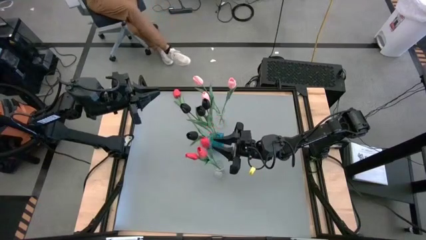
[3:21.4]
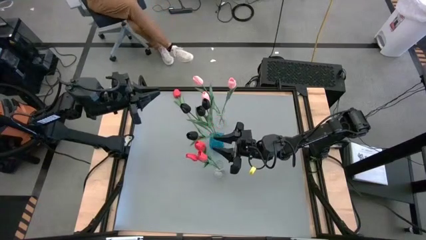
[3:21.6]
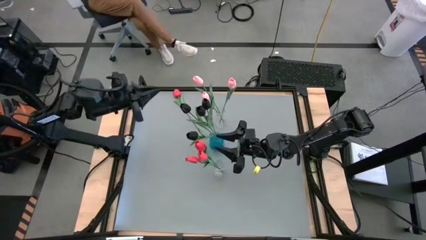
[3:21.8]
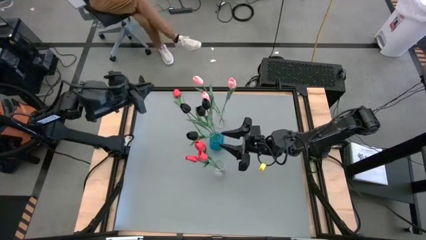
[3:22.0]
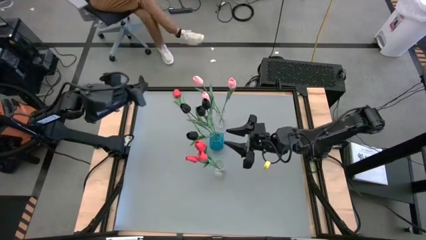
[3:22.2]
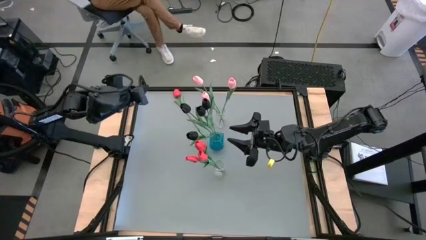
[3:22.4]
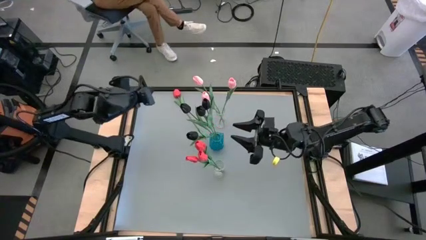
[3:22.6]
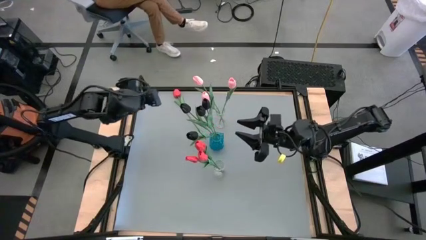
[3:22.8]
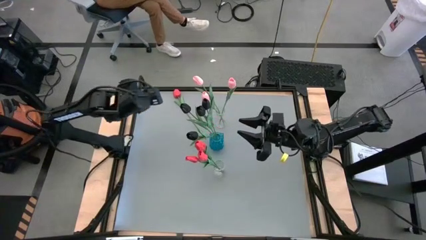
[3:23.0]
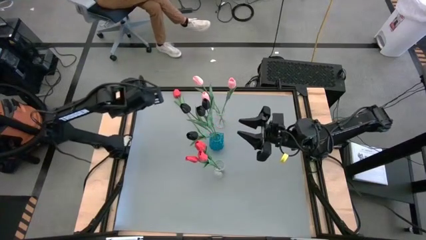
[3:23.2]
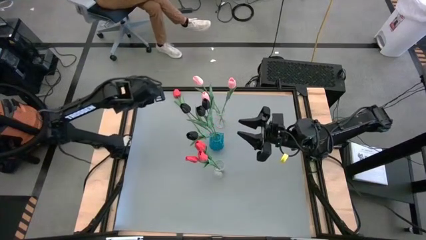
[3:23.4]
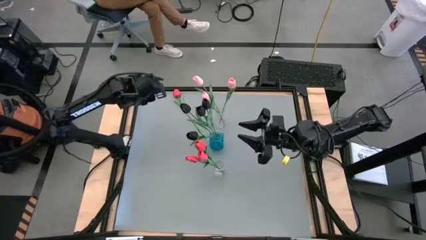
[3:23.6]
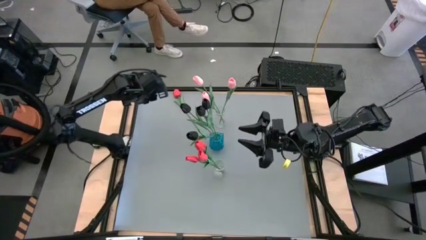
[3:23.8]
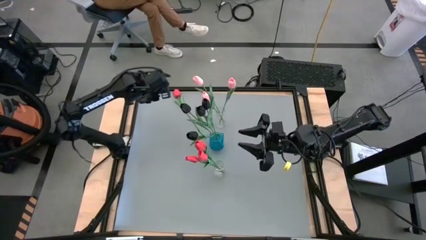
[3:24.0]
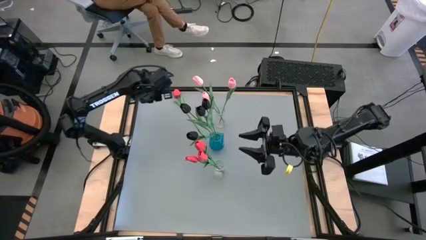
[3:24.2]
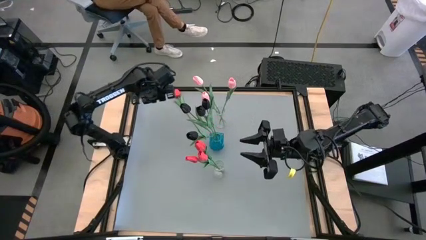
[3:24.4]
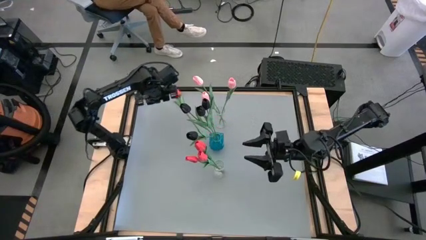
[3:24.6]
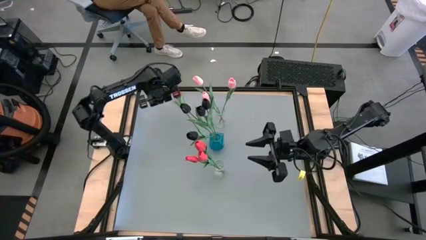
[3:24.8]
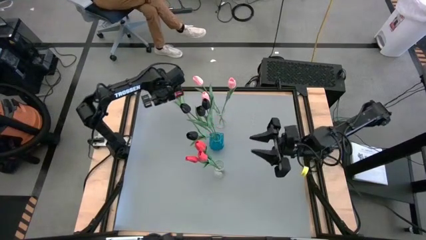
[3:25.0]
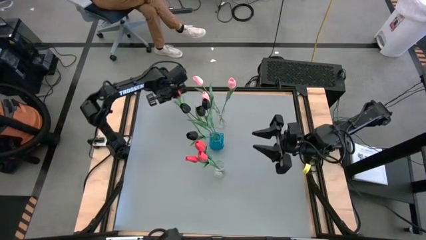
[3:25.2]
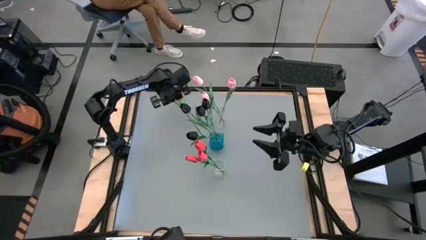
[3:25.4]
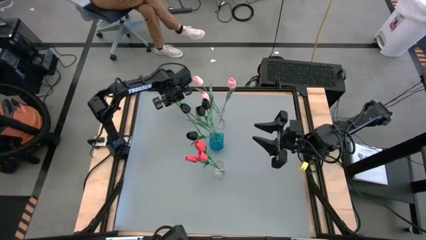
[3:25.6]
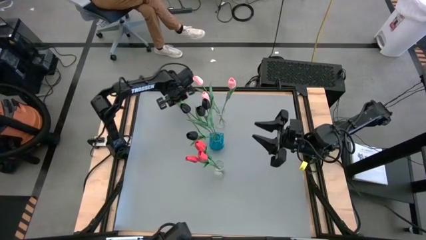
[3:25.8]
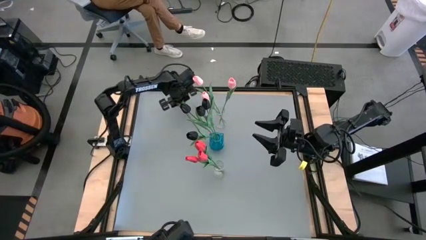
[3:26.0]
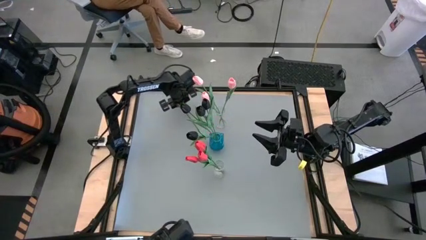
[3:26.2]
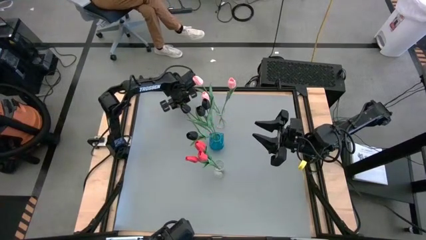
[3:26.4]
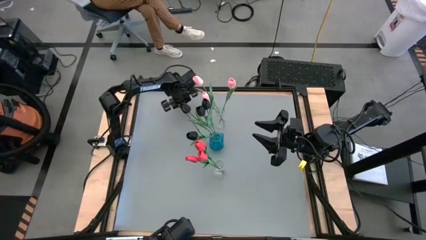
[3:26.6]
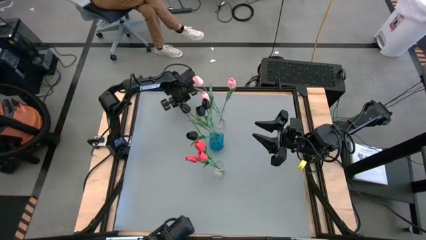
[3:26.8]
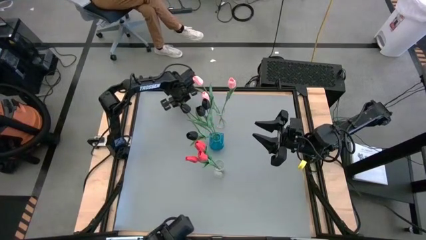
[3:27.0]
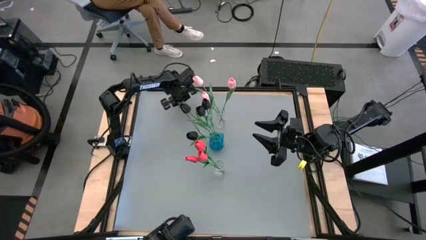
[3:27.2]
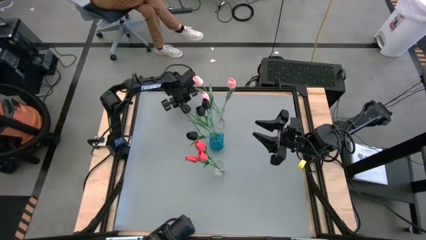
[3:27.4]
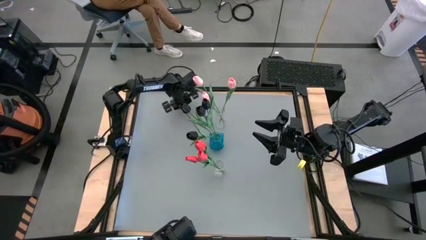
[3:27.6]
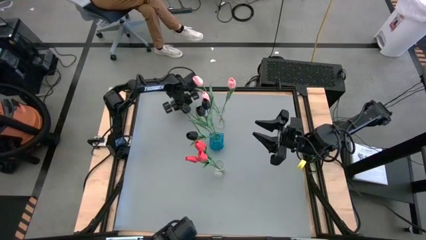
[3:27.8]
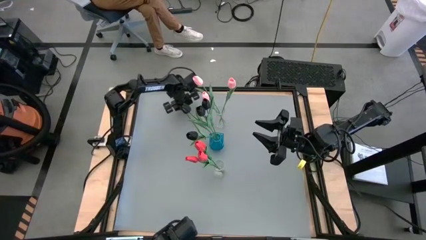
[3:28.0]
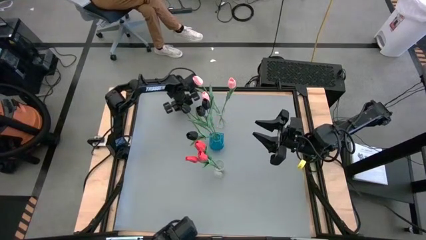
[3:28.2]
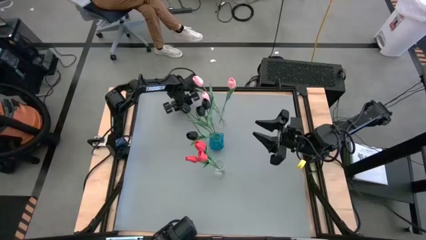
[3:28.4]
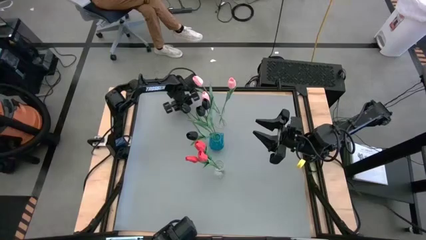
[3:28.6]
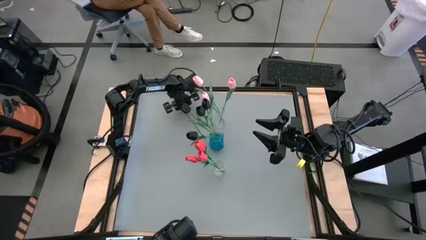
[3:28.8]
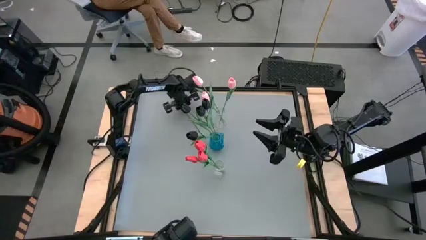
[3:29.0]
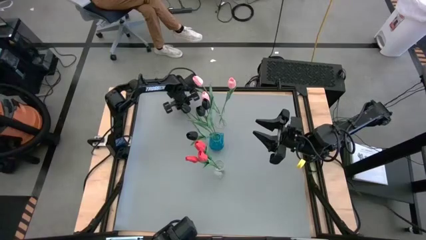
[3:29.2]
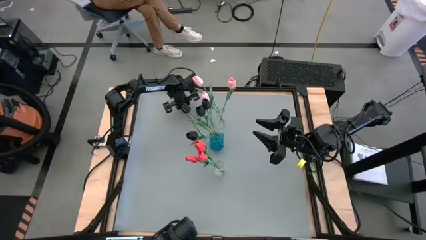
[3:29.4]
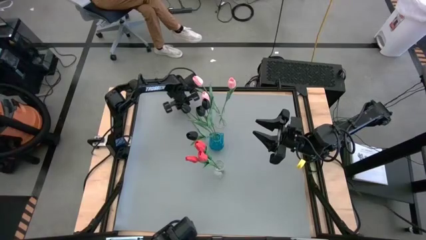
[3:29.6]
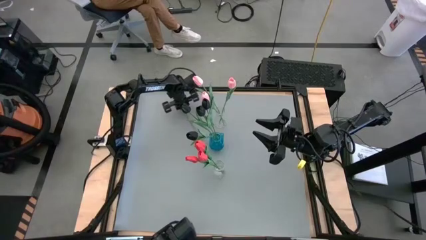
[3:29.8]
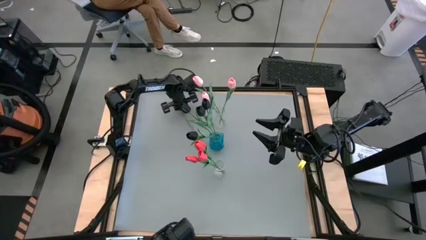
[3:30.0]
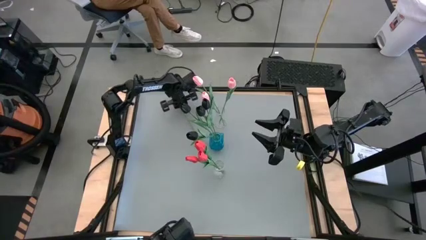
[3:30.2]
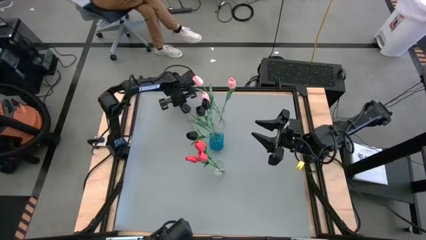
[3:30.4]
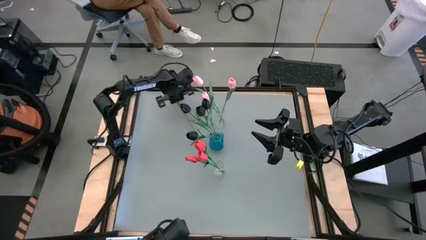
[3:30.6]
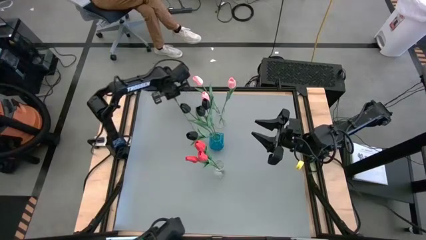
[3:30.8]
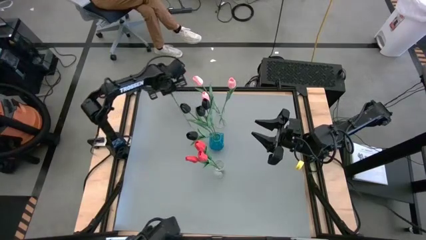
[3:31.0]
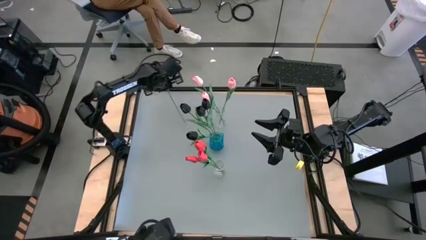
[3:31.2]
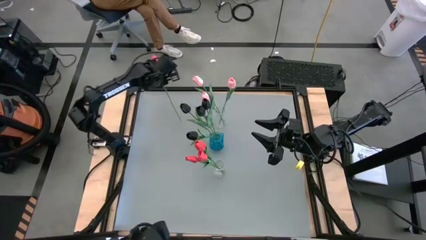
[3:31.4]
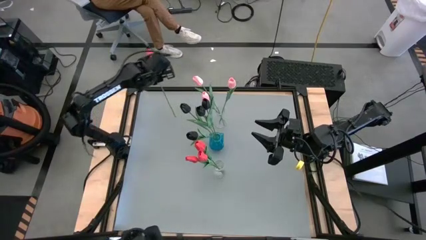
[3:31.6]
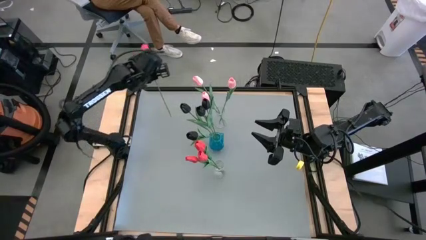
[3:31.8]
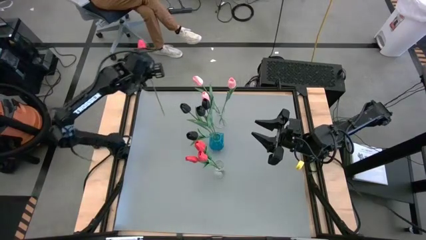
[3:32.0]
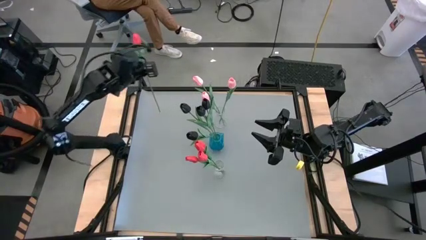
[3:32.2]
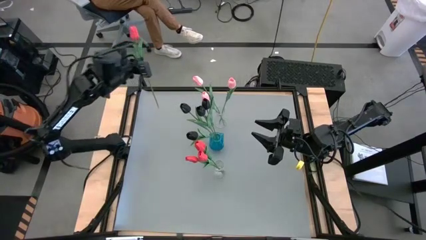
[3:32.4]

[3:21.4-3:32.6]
Task: Sort flowers into vase by color
Put the red tulip into the bottom transparent vase
